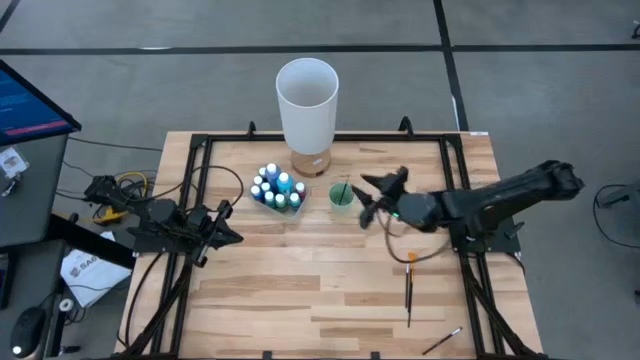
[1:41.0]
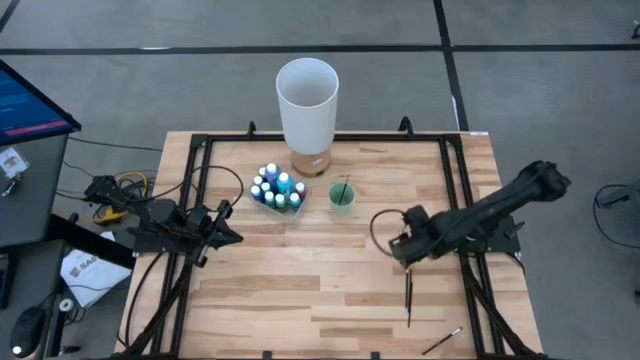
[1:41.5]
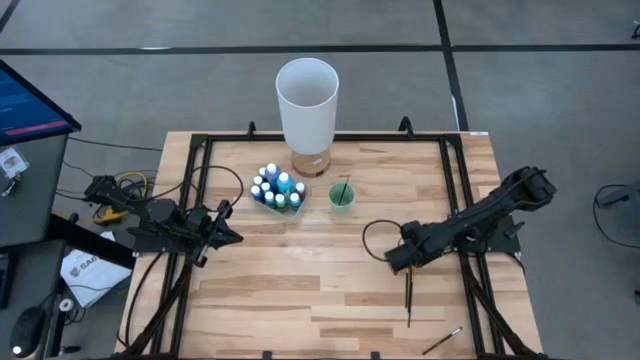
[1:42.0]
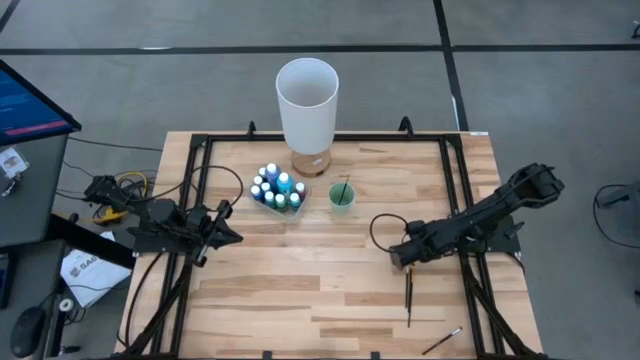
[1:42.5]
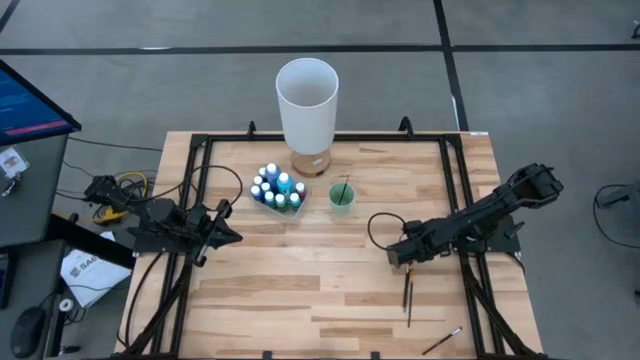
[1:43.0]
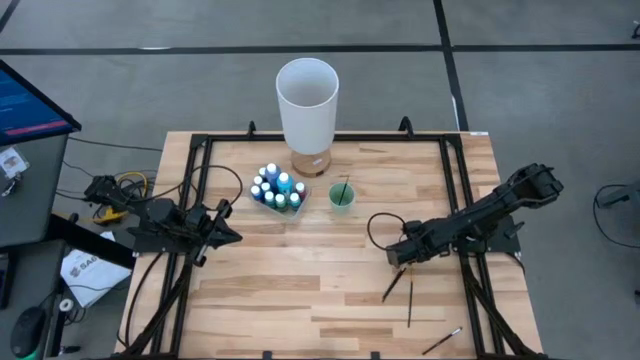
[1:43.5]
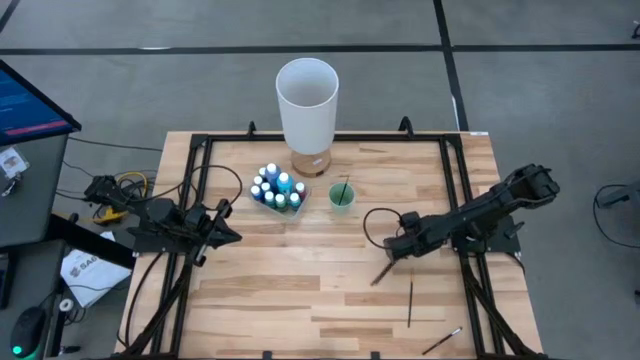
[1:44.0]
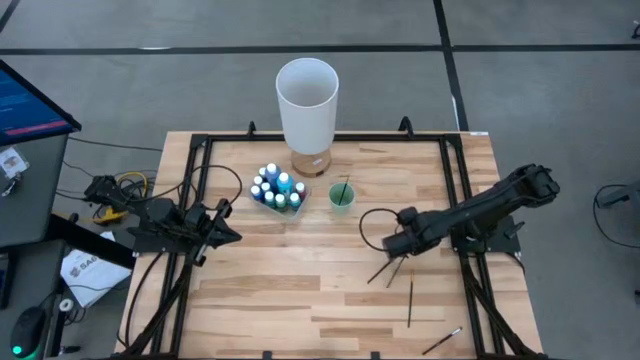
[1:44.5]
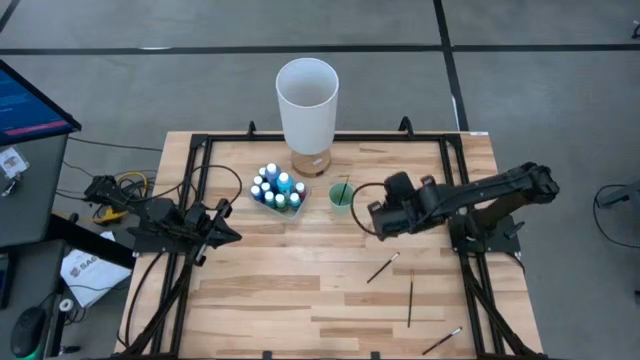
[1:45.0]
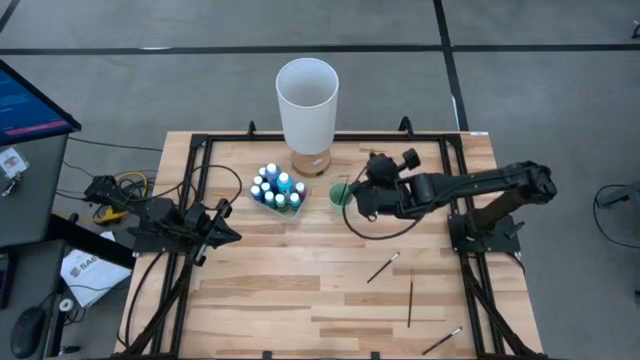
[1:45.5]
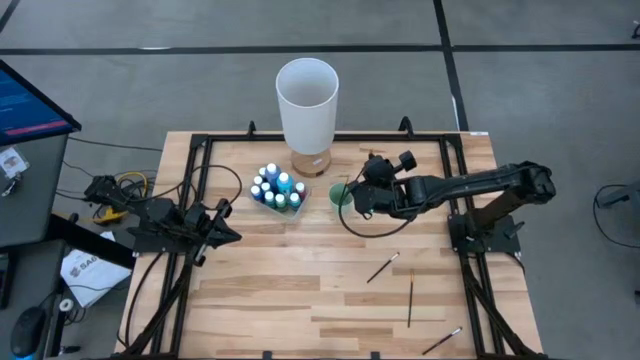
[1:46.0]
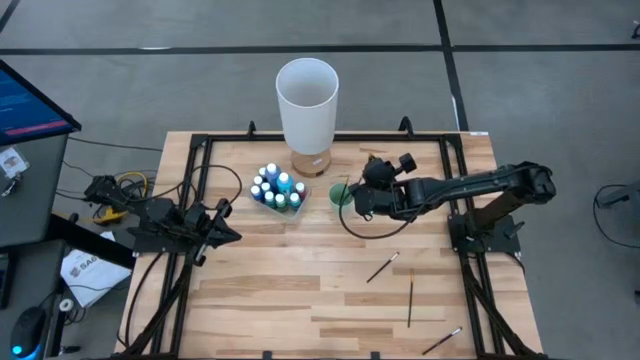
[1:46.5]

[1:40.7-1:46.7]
Task: Pick & Place Paint Supplies
Put the left gold paint brush into the green cup

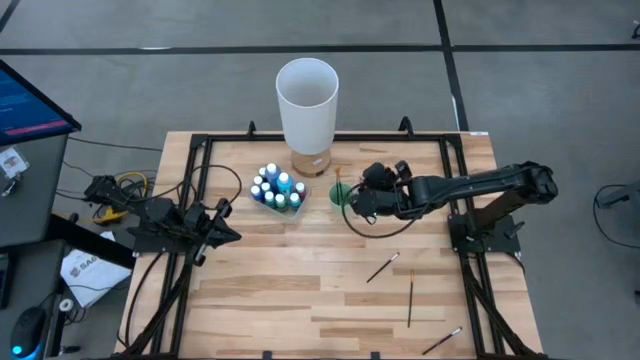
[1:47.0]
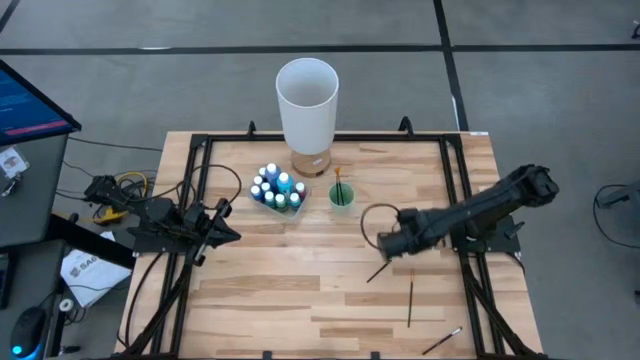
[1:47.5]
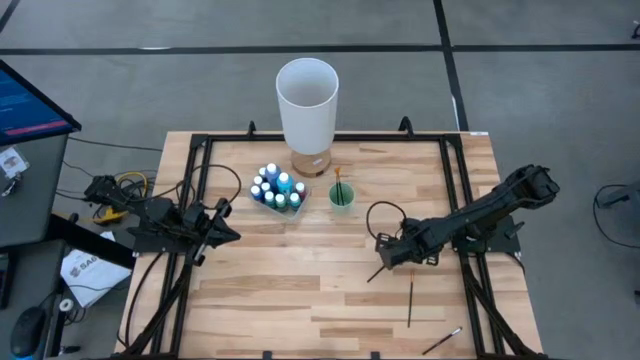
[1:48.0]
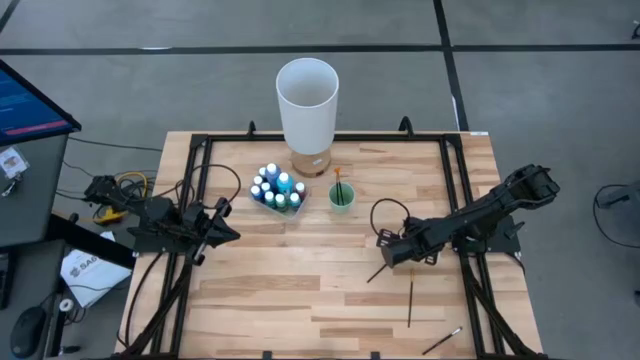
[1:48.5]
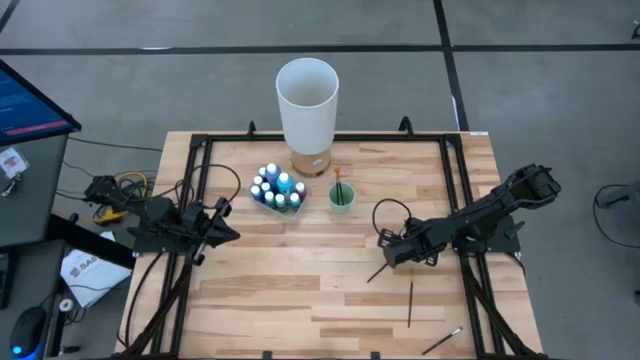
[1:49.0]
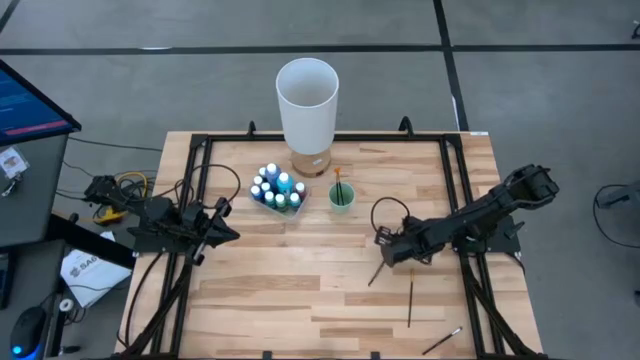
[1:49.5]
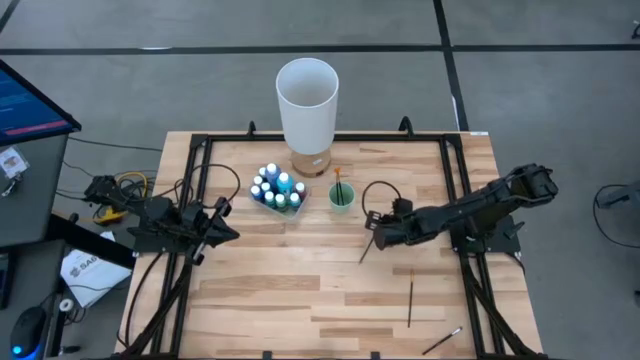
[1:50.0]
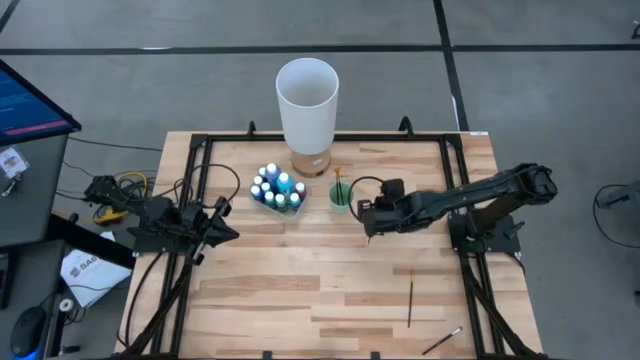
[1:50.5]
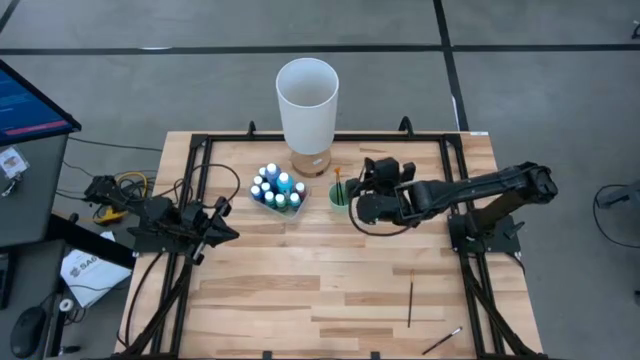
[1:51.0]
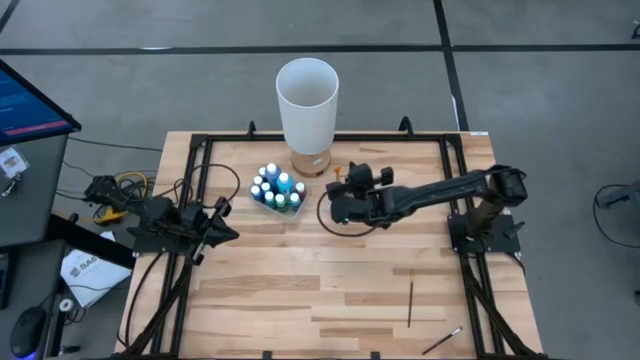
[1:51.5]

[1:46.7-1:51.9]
Put the top silver paint brush into the green cup

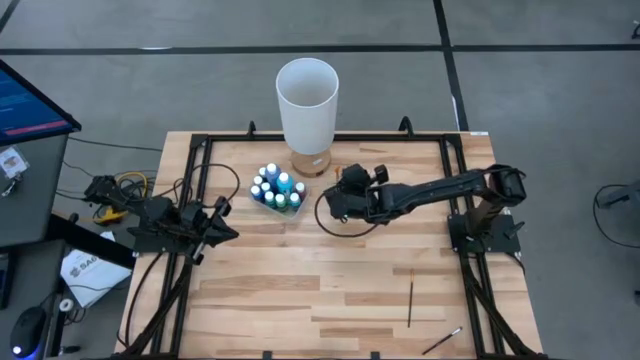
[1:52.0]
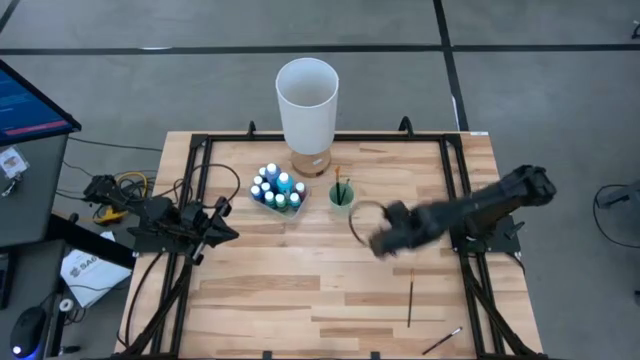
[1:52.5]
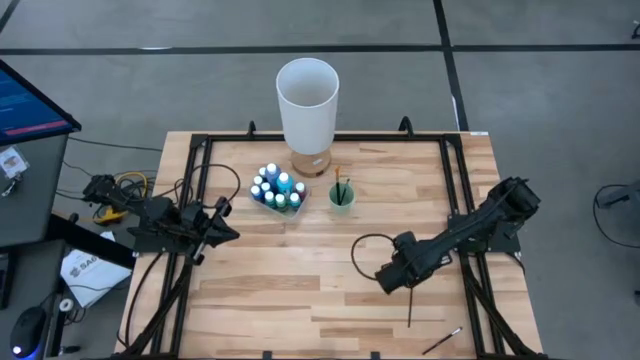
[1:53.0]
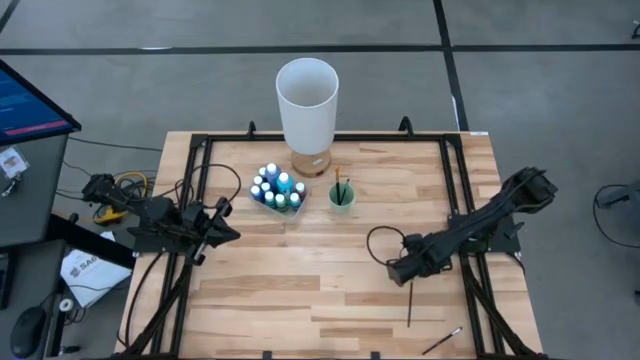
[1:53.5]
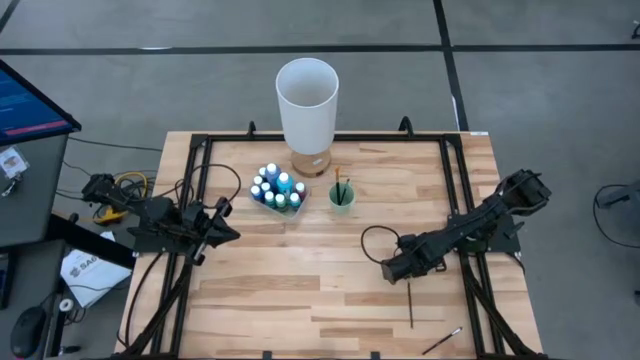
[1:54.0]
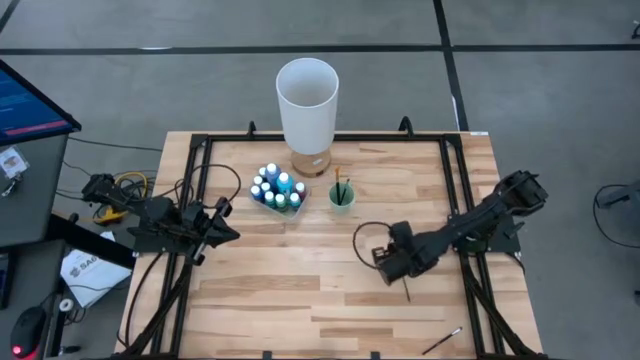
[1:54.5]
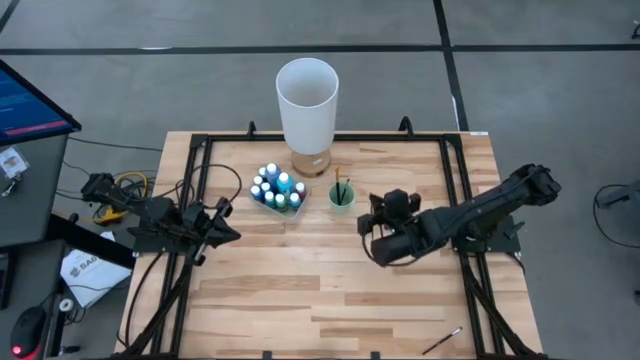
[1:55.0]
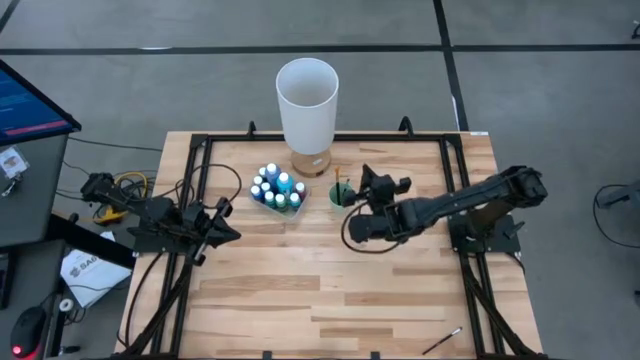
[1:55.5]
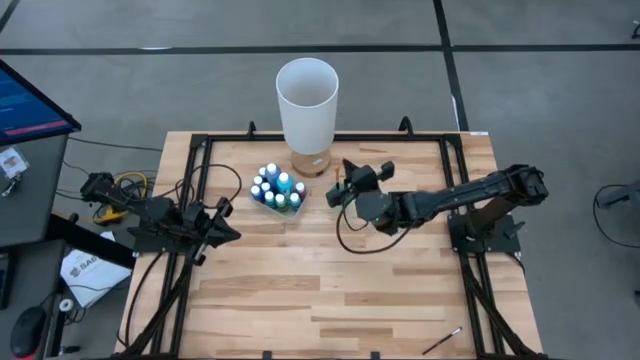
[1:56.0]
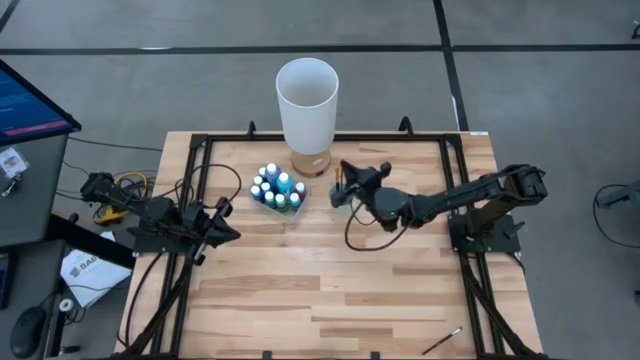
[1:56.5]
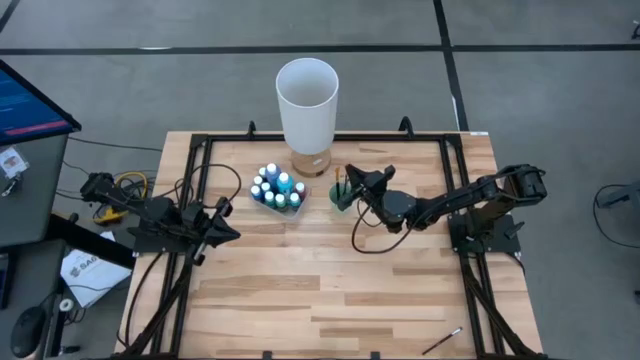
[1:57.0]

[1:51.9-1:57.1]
Put the gold paint brush into the green cup

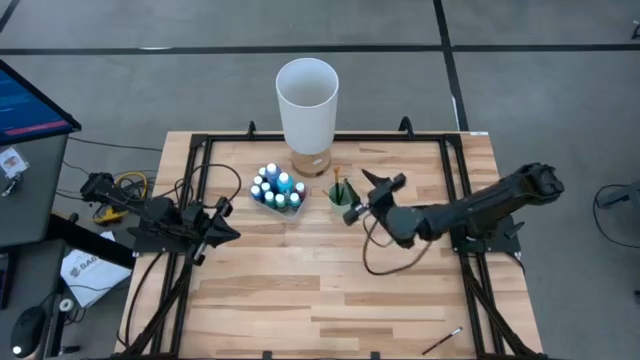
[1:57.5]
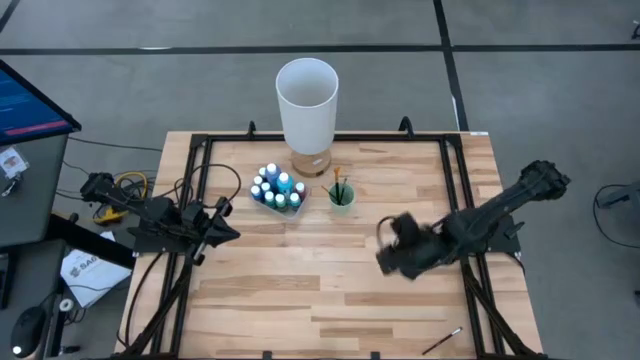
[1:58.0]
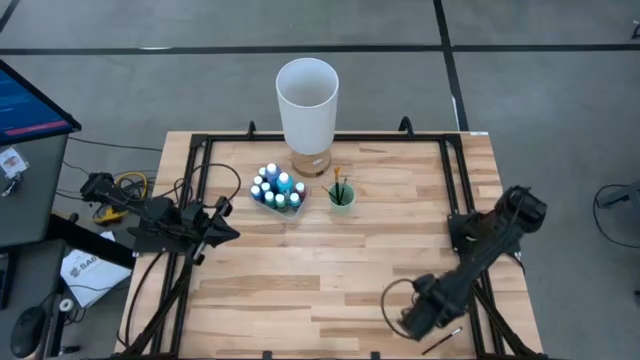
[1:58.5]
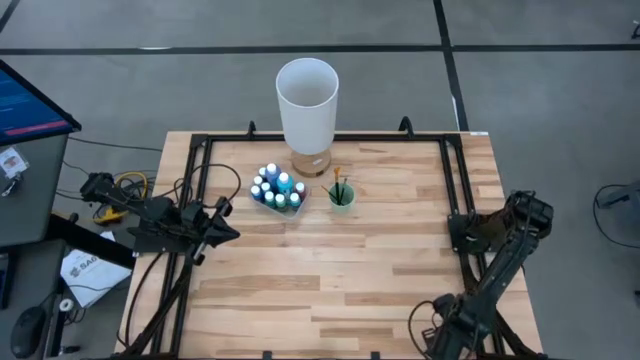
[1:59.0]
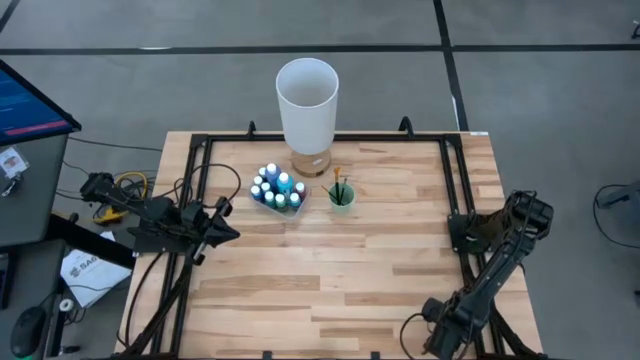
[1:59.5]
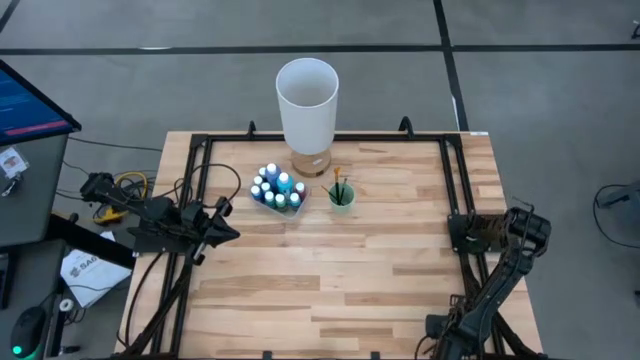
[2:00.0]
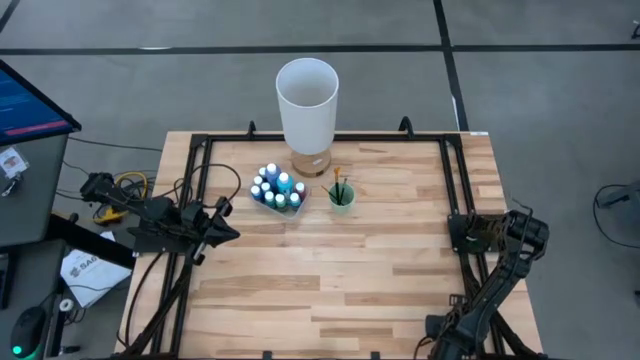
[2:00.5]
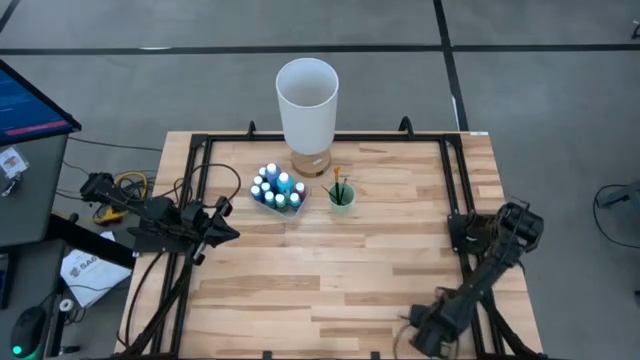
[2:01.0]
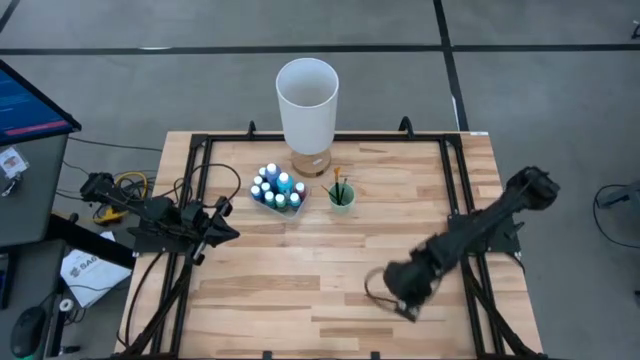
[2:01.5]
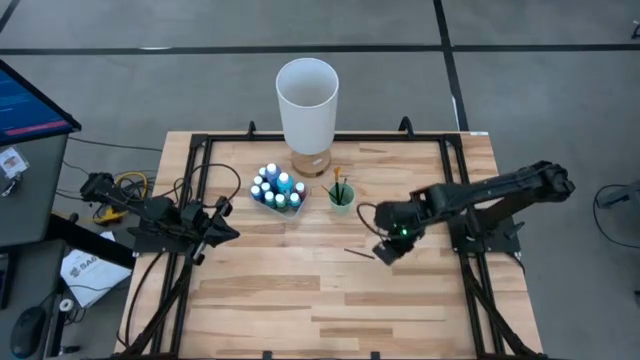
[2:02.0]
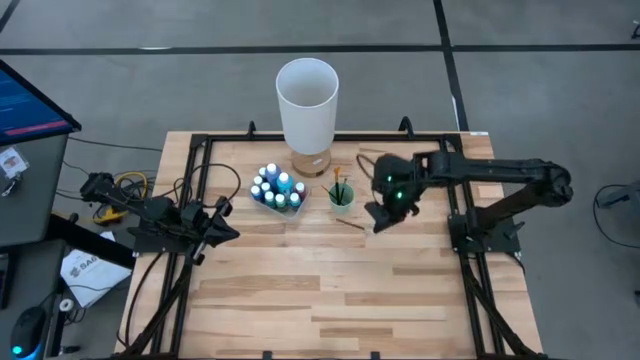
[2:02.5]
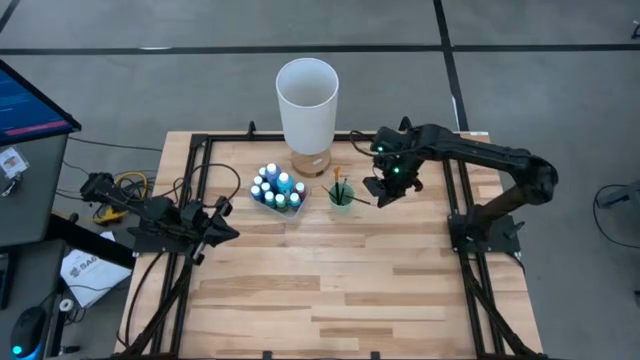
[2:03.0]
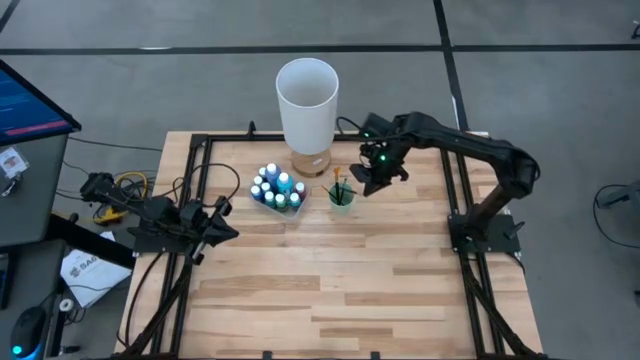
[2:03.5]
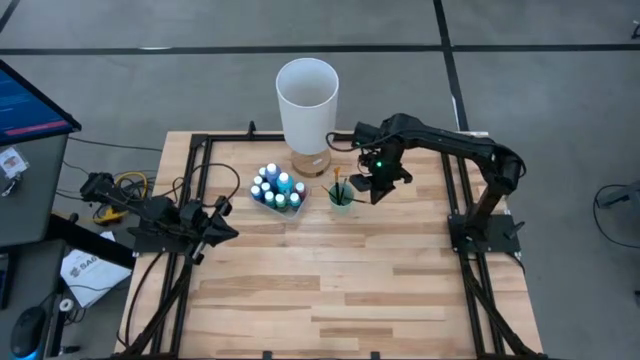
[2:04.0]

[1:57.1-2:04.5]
Put the silver paint brush into the green cup
